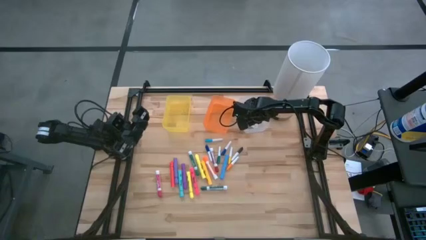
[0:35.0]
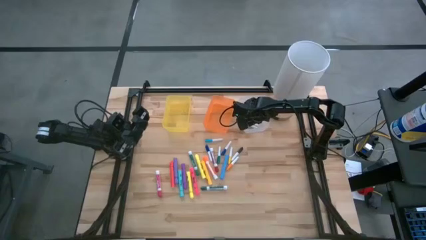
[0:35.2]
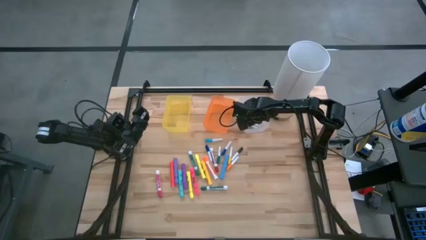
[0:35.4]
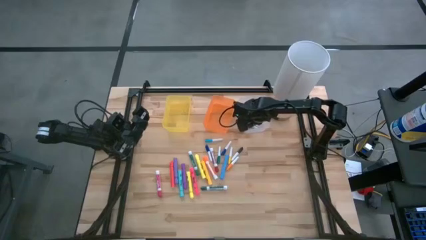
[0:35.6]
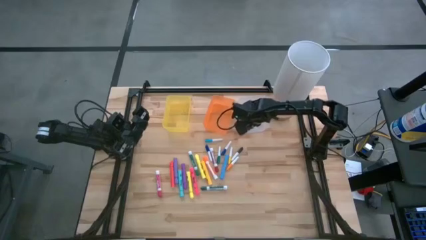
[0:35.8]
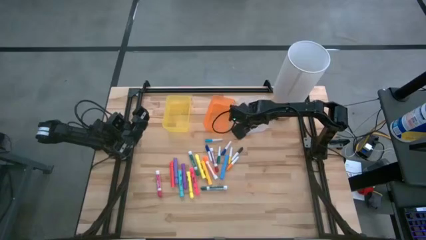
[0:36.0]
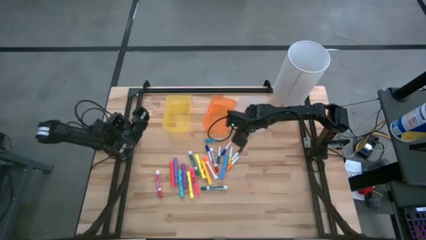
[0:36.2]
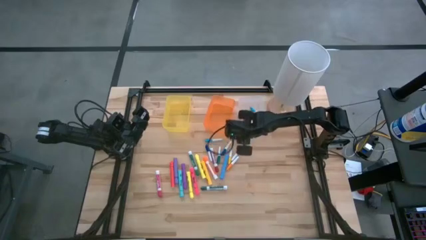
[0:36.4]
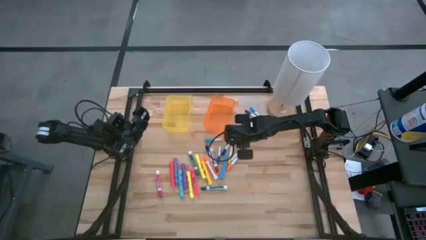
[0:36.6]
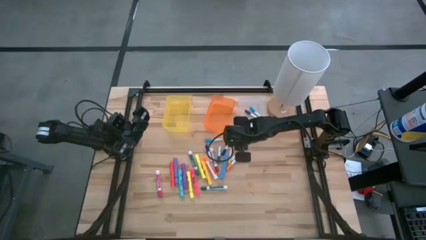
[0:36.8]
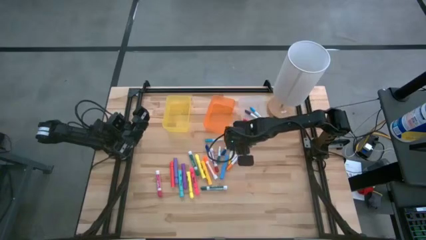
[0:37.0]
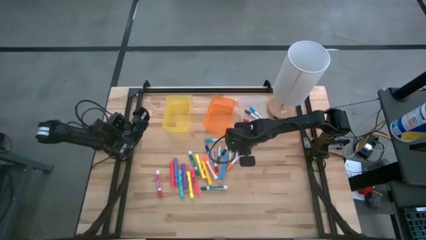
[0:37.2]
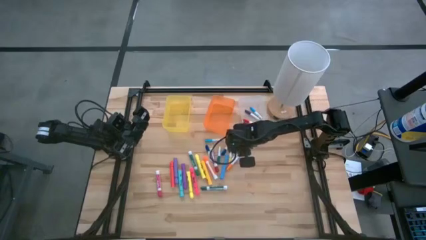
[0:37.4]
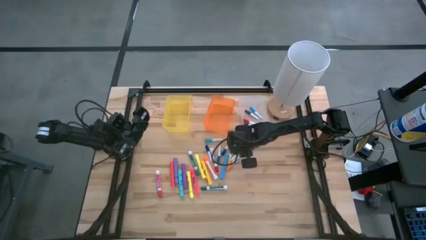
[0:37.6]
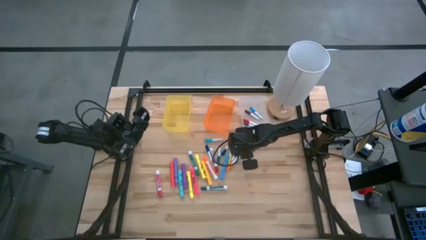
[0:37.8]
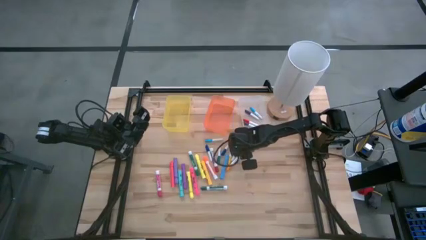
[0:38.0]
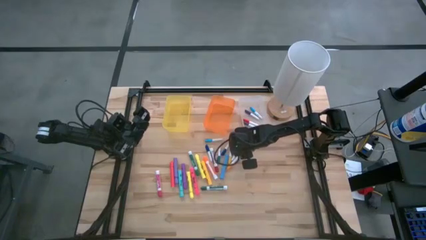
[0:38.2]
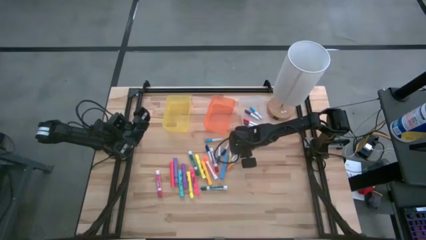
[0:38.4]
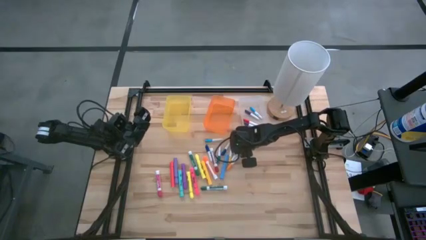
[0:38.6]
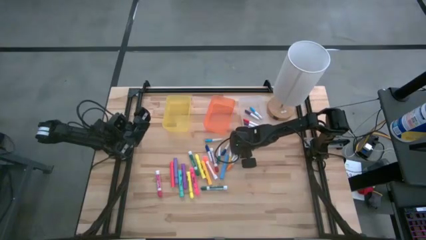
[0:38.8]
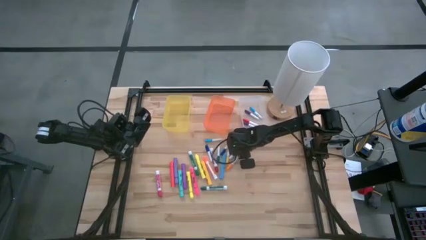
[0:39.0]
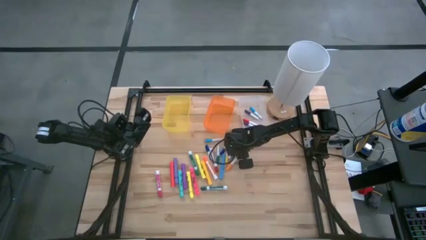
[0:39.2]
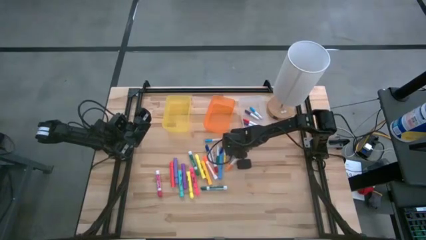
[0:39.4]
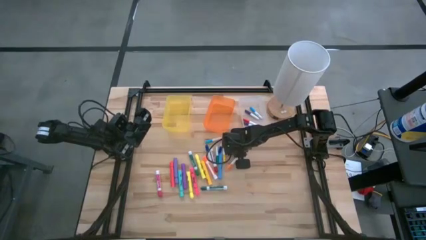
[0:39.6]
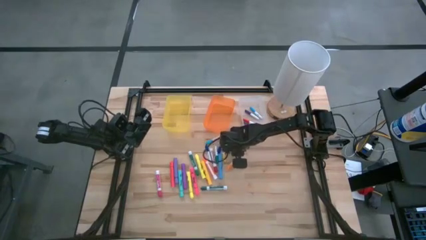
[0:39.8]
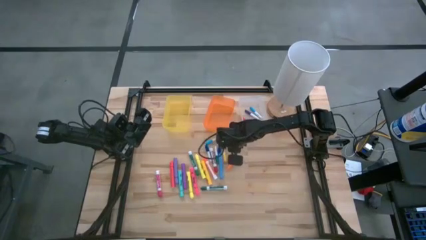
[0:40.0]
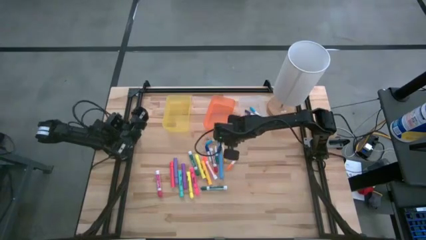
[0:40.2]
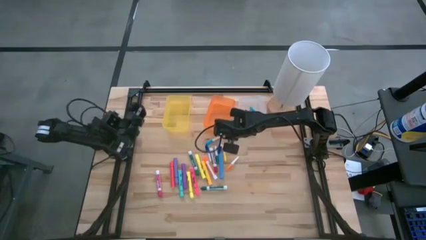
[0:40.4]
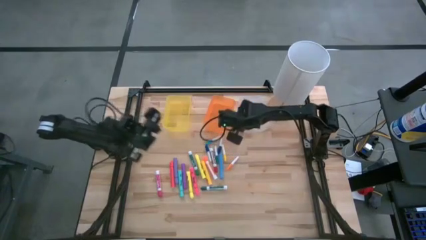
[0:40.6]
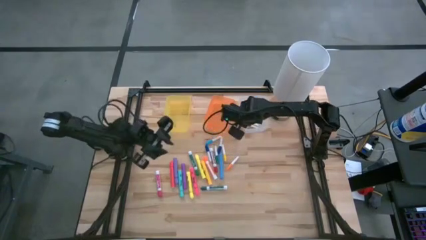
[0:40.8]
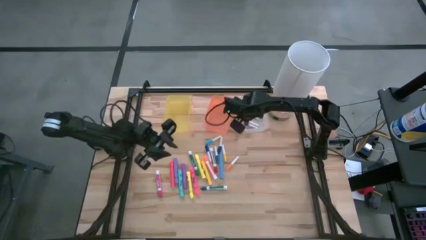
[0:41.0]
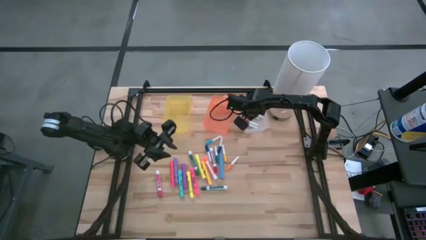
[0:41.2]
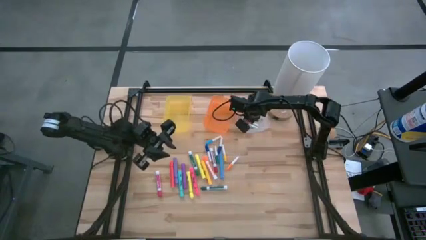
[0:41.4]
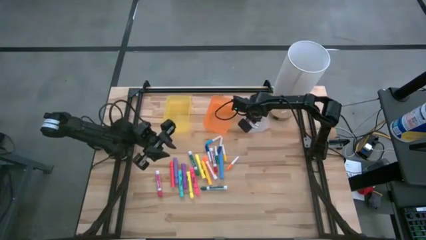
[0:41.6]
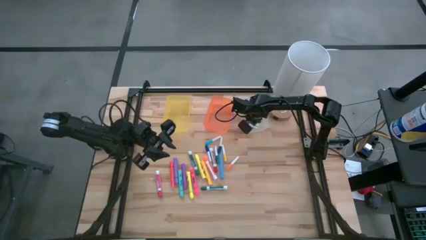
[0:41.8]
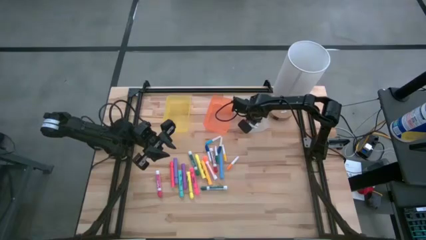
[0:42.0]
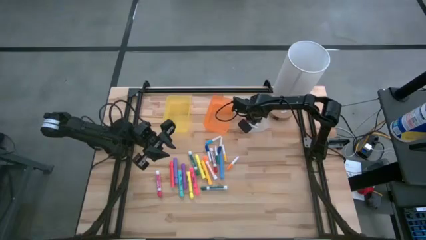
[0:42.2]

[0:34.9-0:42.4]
Task: Pick & Place Markers
Put the black mini marker into the white bin

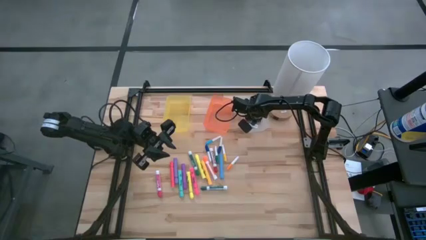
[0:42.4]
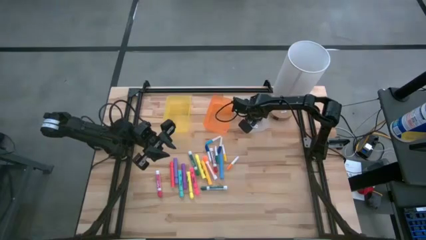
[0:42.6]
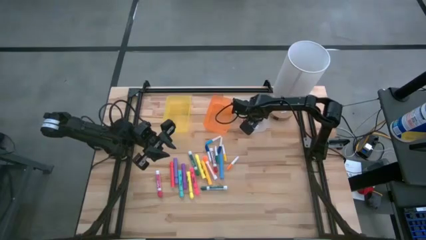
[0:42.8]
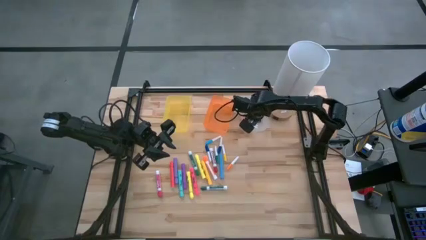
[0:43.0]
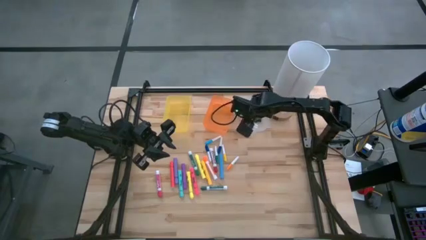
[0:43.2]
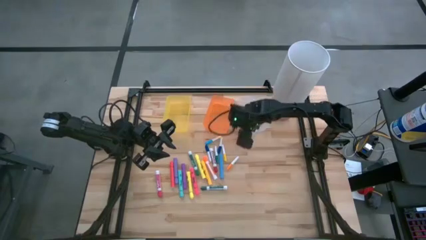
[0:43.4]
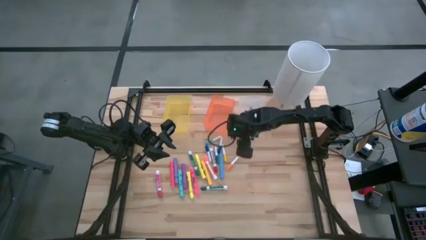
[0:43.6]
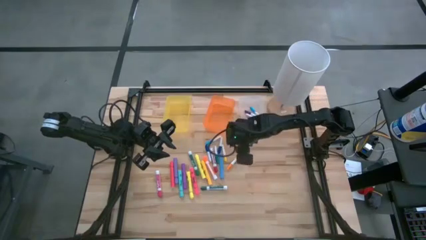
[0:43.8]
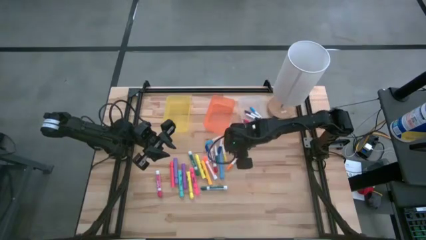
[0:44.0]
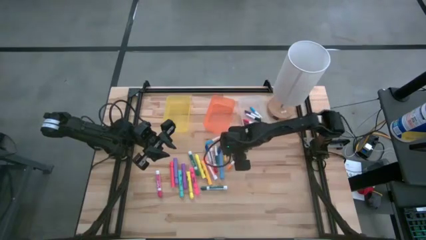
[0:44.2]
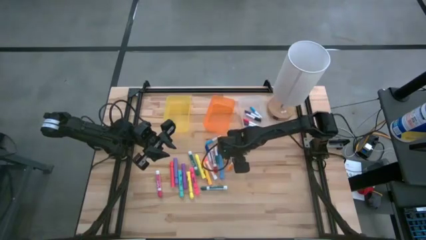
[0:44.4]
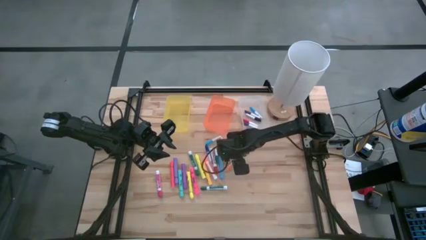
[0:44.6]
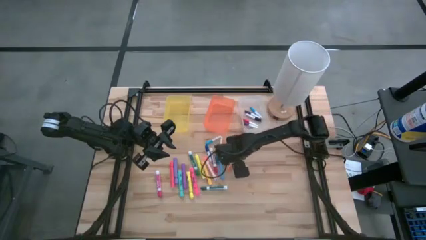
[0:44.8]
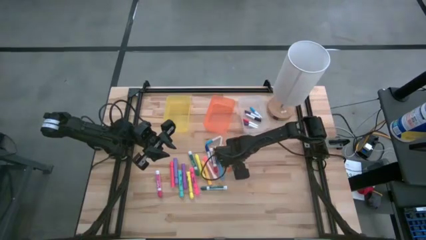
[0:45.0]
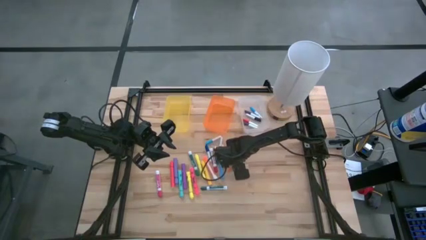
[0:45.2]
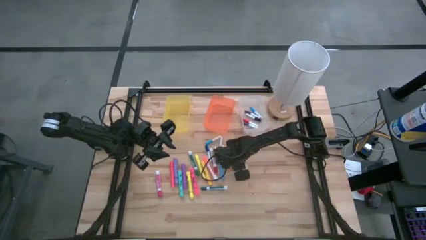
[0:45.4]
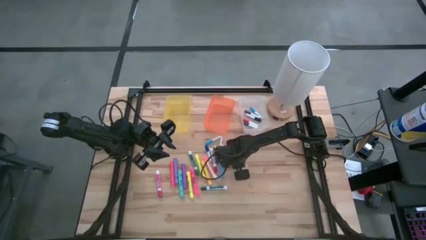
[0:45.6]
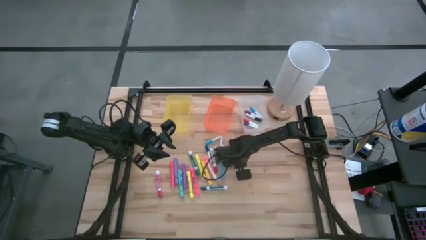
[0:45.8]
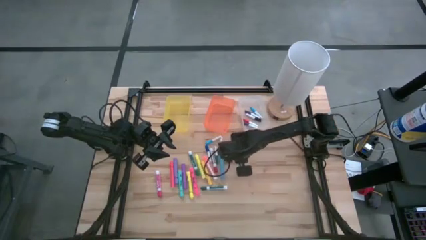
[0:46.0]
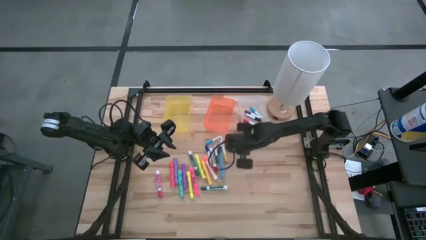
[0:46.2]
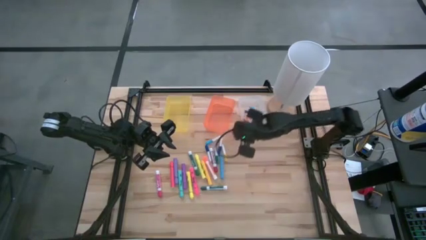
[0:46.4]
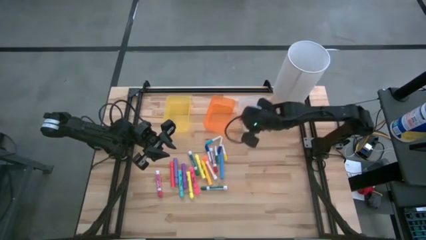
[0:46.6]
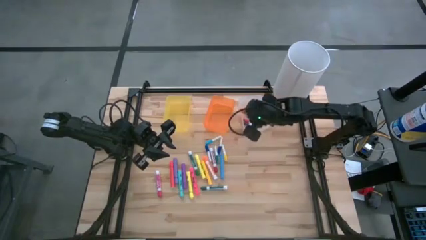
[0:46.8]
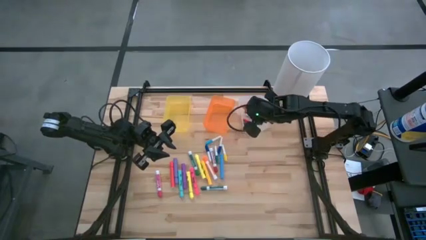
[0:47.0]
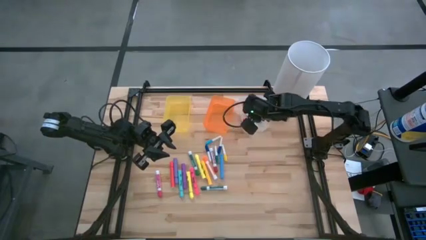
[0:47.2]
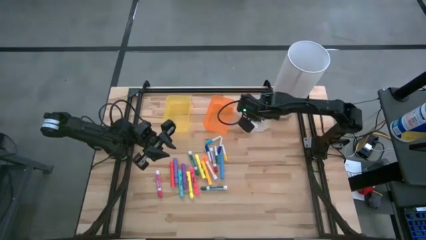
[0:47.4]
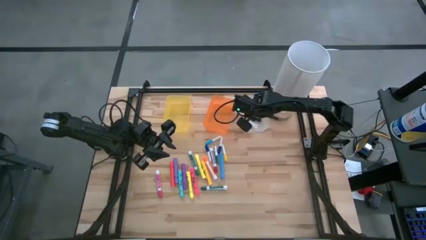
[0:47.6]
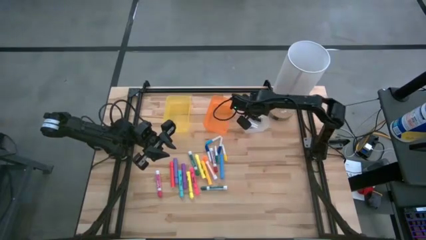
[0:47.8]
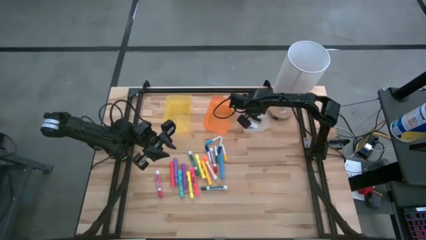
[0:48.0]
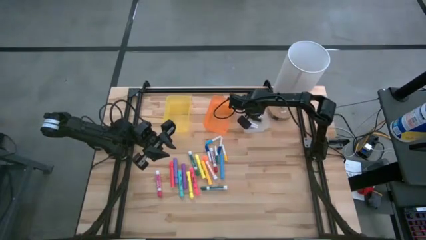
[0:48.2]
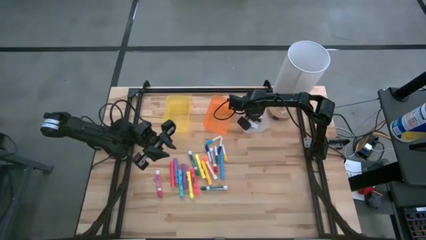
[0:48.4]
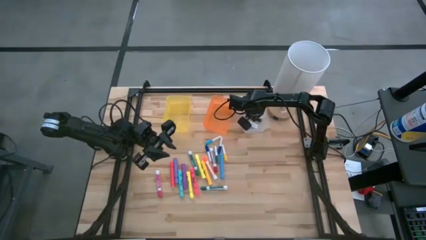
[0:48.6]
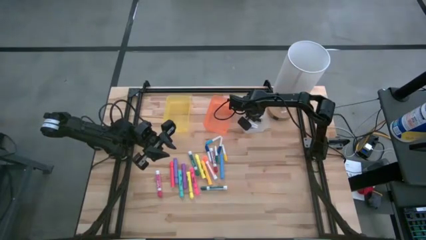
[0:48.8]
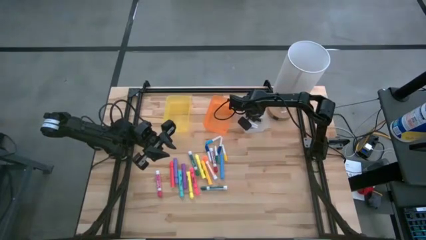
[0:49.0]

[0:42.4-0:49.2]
Put the orange mini marker into the white bin

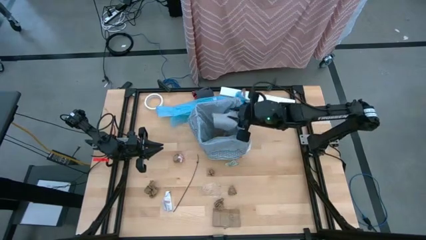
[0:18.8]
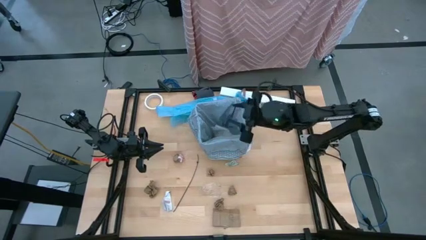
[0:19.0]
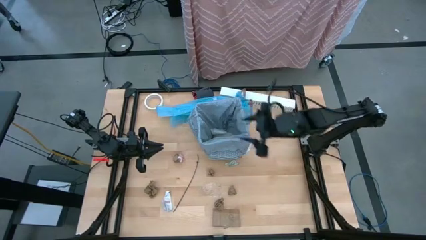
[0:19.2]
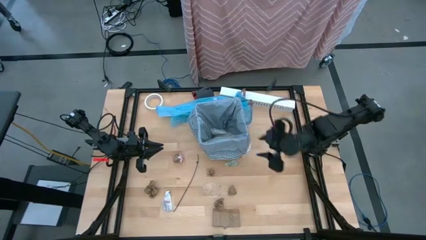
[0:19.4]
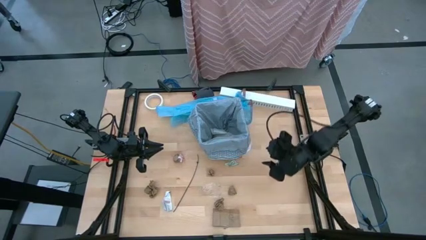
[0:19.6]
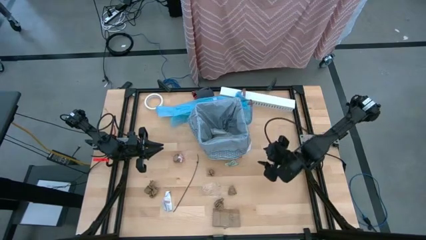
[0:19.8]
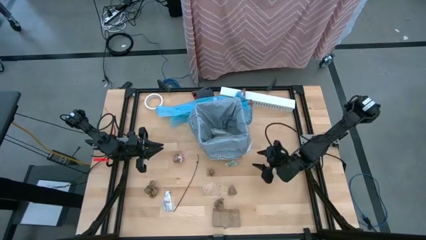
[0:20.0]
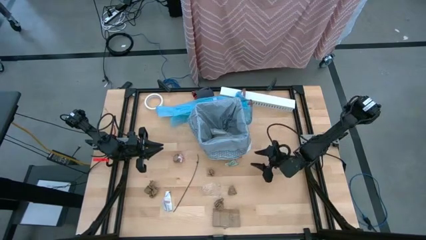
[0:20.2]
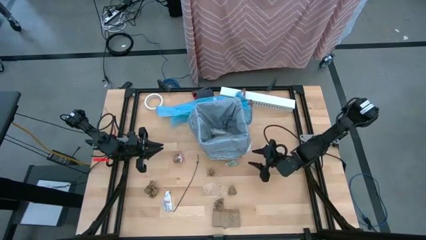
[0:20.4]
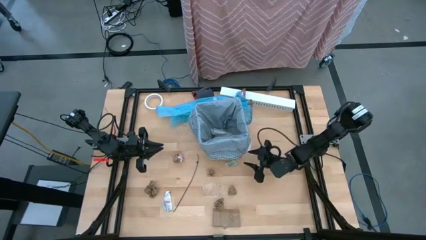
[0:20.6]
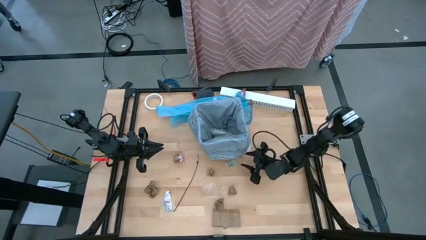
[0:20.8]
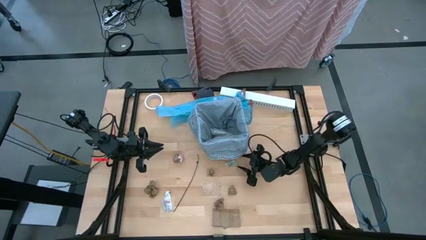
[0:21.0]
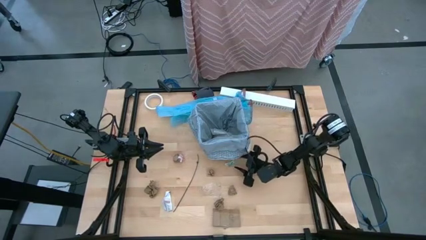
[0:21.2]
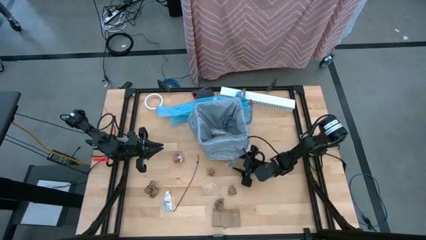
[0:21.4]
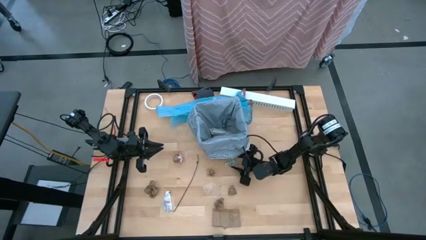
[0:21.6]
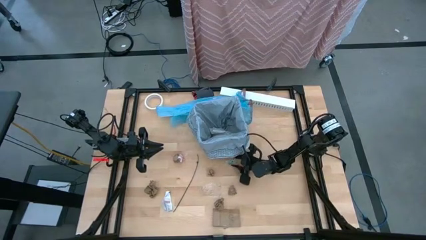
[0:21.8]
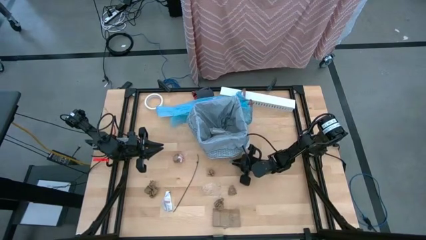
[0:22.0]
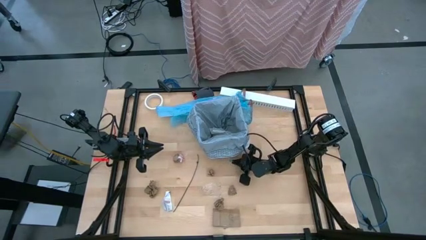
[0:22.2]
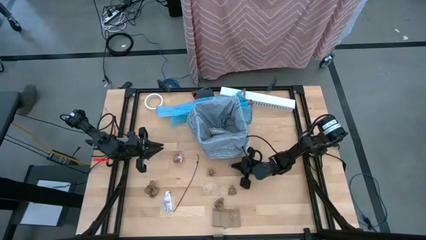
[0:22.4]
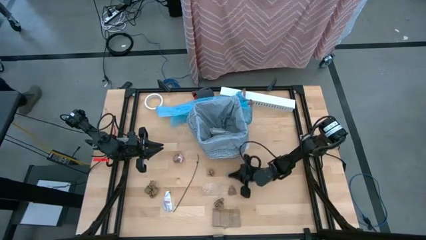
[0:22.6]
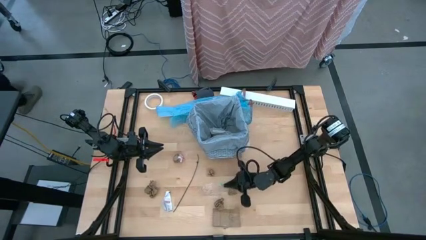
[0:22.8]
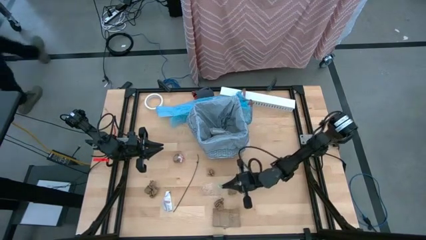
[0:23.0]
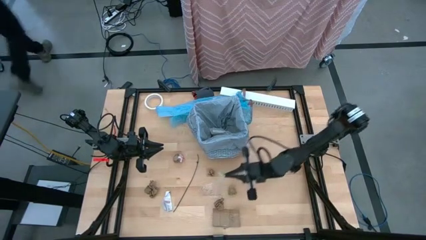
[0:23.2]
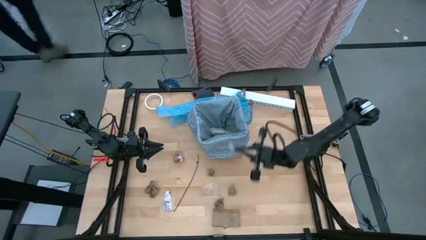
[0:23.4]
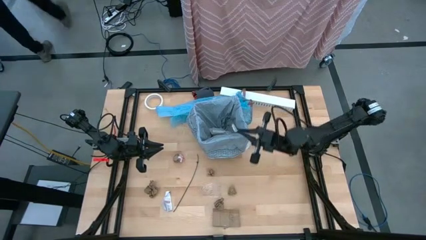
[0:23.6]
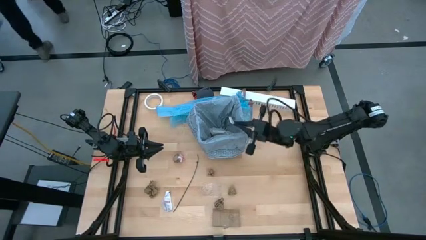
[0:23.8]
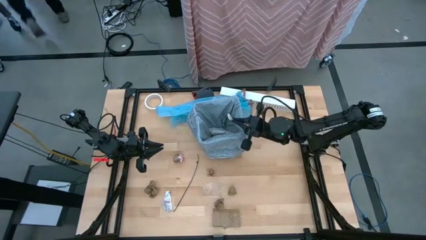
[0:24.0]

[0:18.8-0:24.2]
Task: place trash/remove bag and relplace
Put the white paper inside the black trash bin
